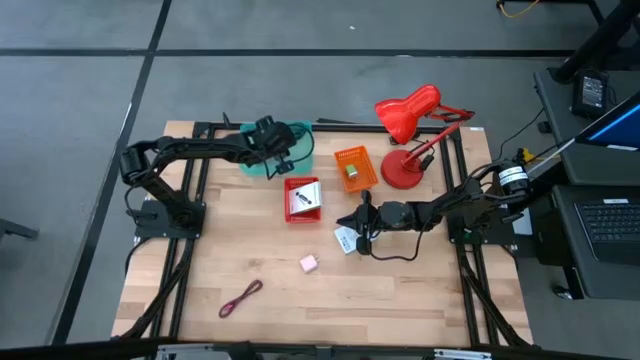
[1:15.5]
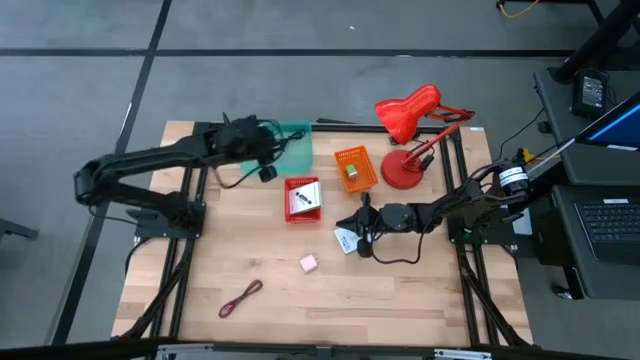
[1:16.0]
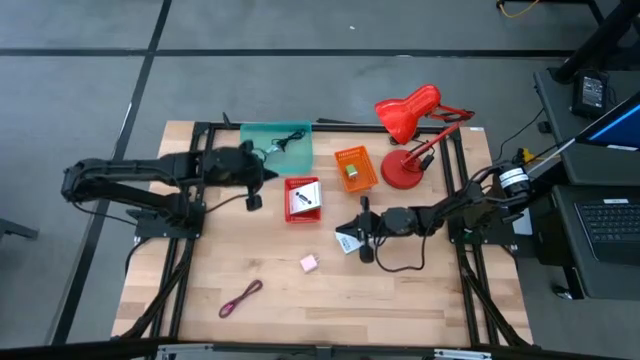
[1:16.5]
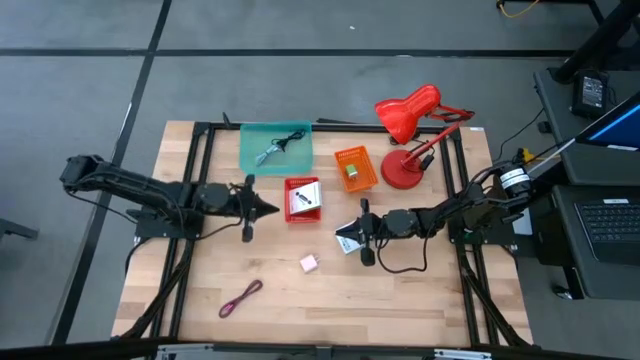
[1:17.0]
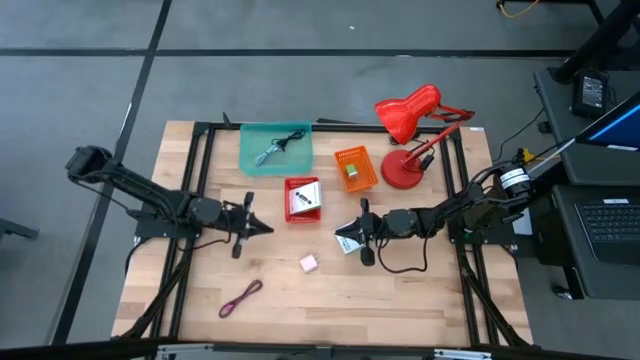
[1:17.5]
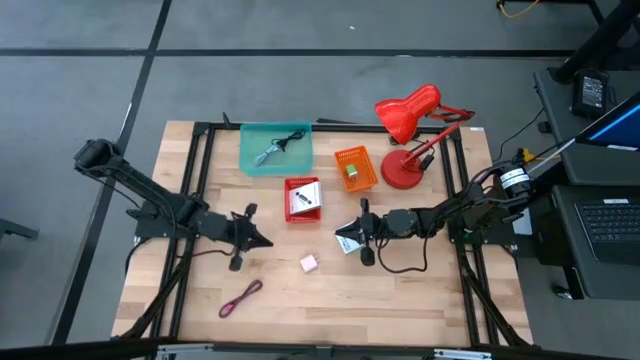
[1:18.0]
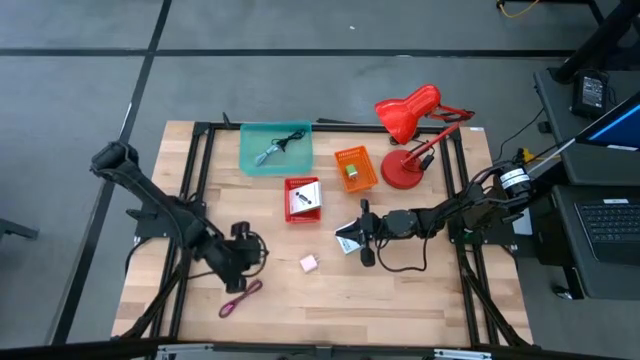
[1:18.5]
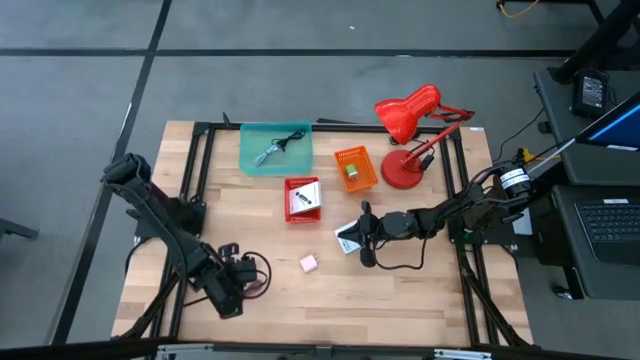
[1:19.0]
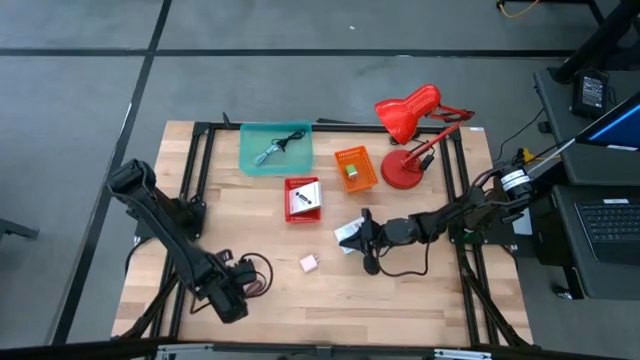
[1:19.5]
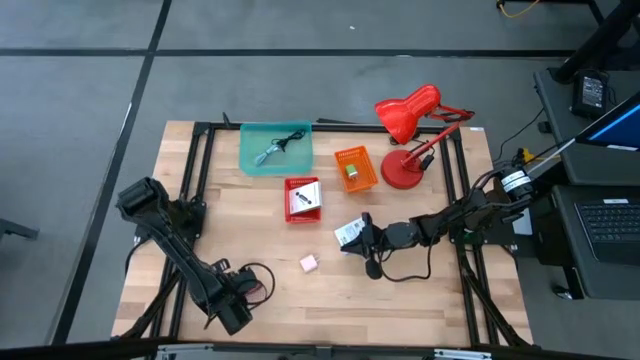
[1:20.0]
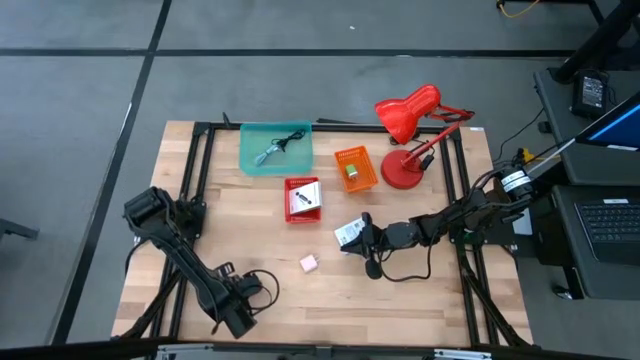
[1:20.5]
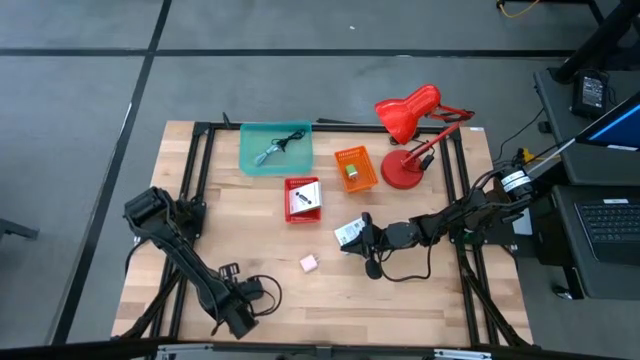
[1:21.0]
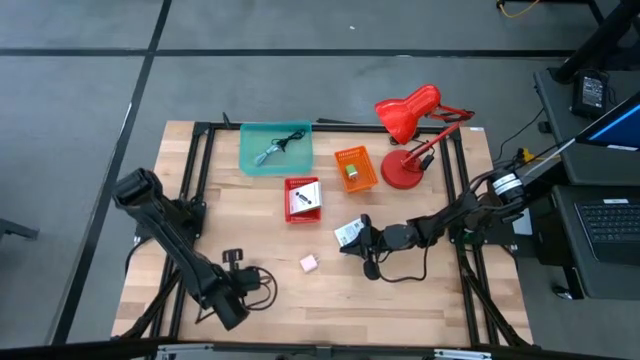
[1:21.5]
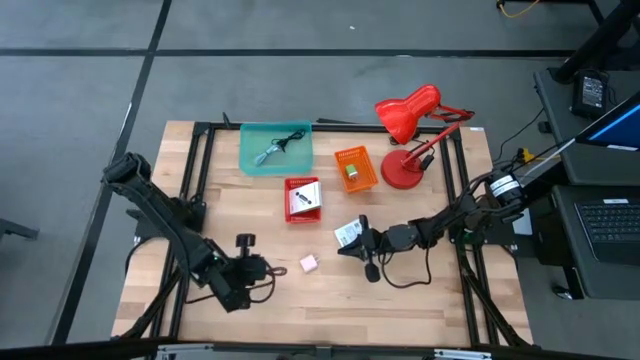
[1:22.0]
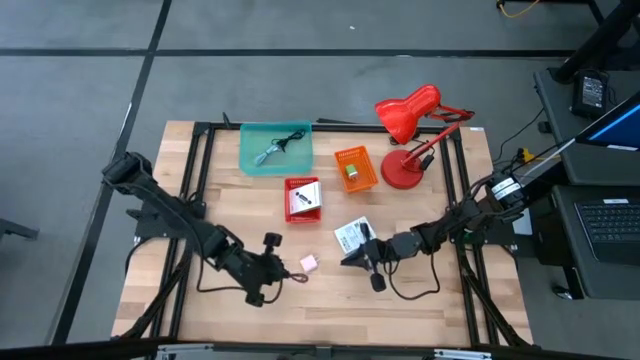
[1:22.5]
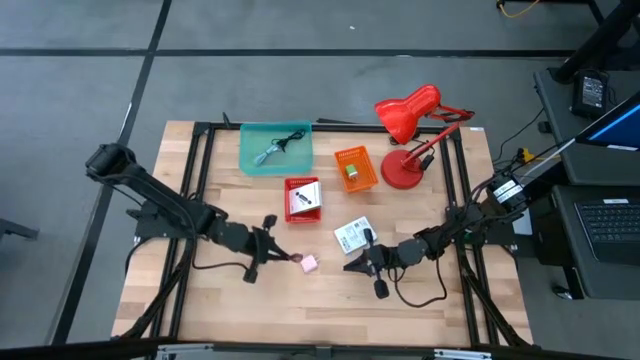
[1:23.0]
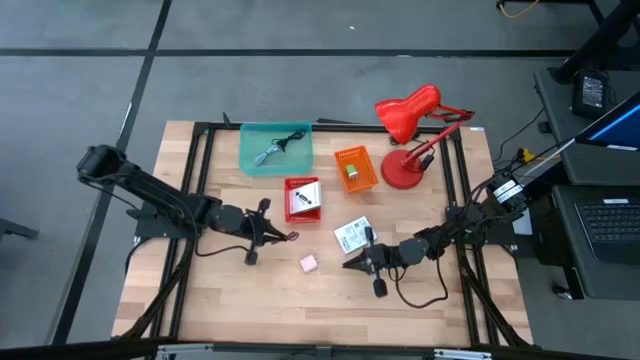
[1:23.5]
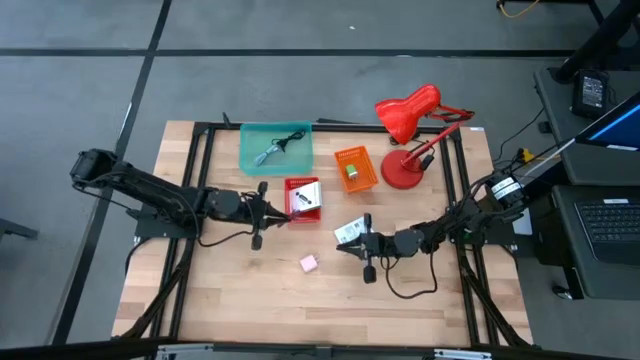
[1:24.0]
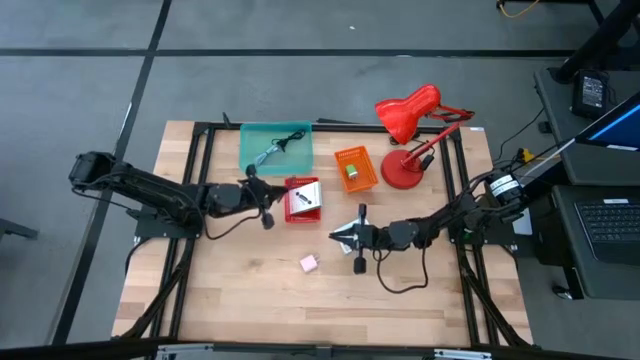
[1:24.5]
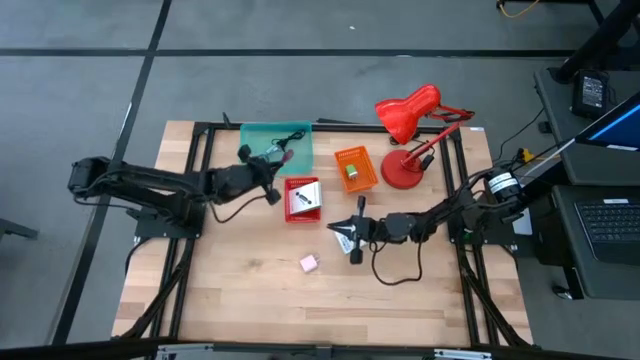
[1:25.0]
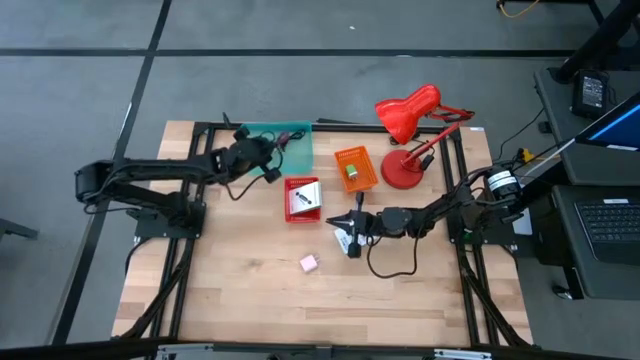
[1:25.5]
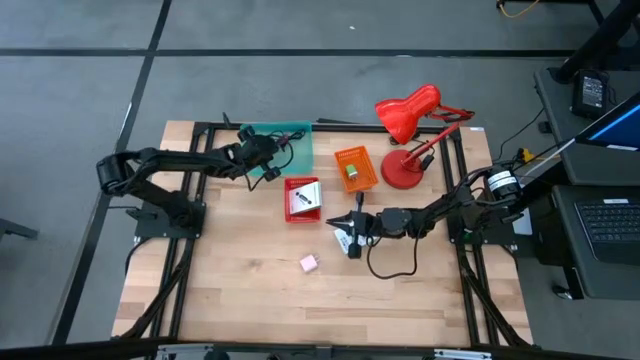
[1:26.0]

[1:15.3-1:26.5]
Task: Pick and place items into bin
Put the pink charger cable into the blue bin

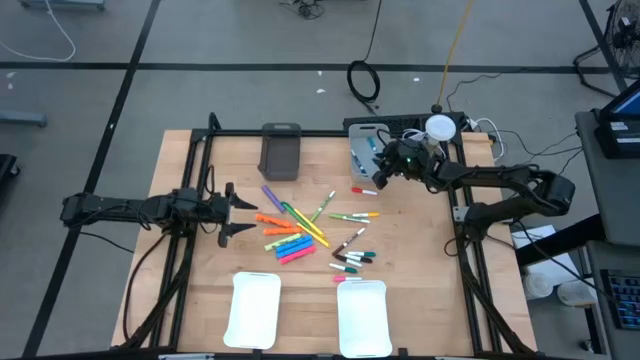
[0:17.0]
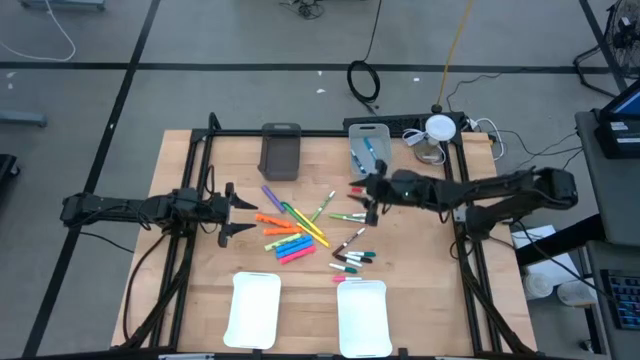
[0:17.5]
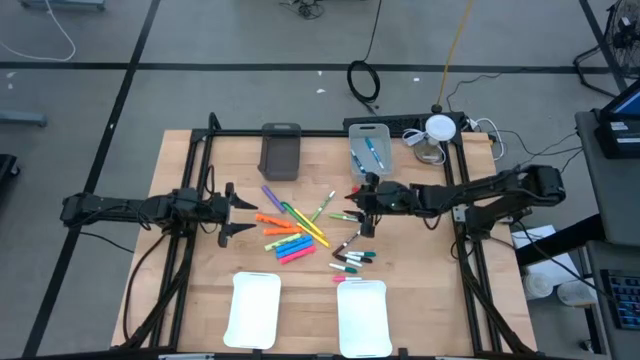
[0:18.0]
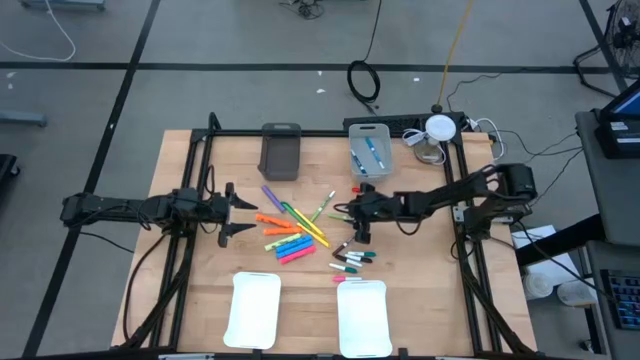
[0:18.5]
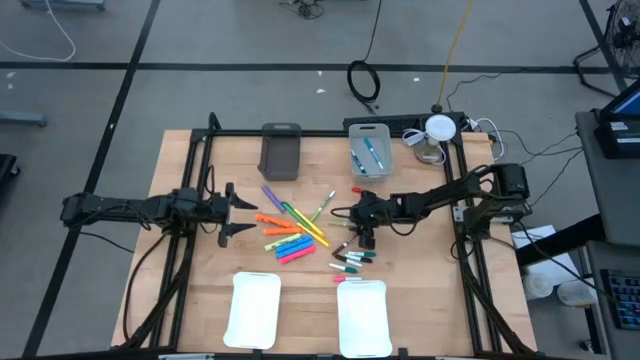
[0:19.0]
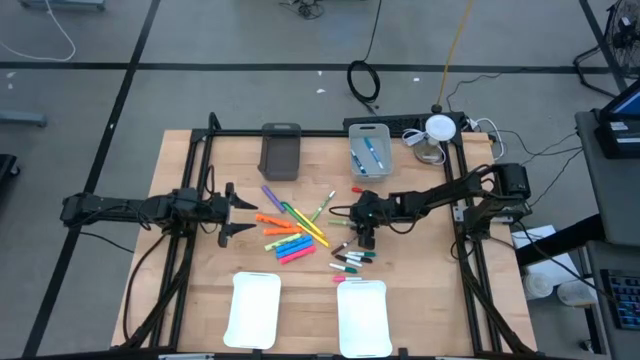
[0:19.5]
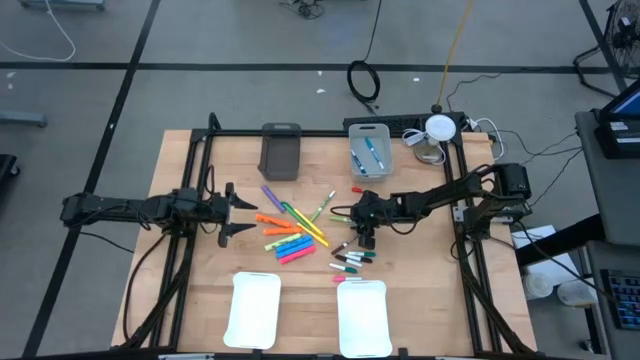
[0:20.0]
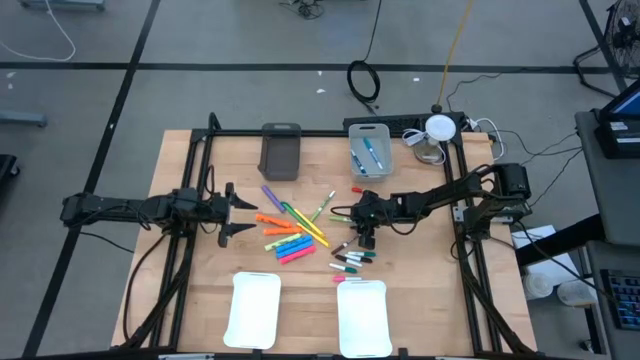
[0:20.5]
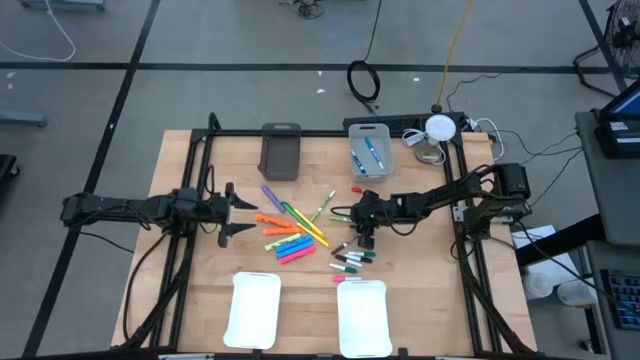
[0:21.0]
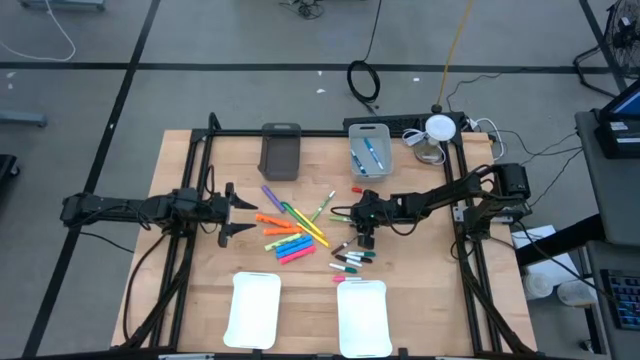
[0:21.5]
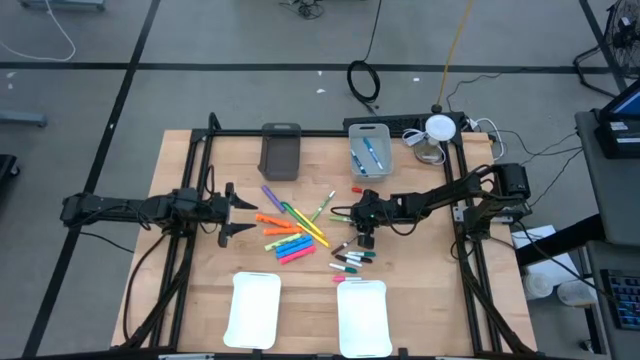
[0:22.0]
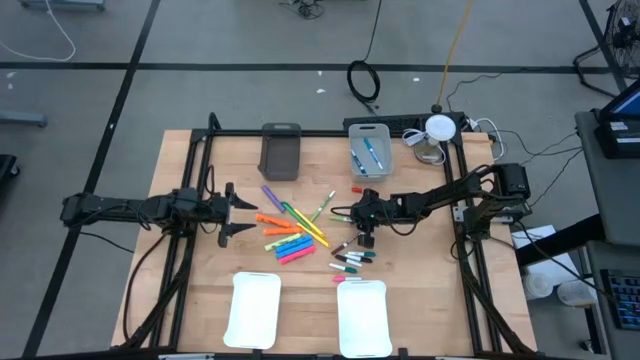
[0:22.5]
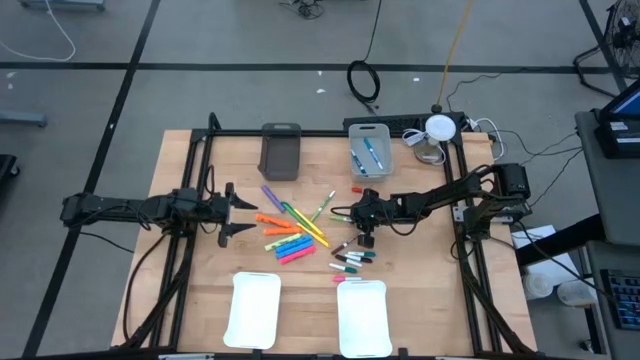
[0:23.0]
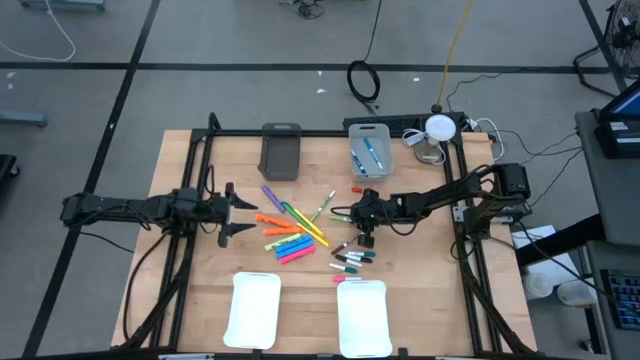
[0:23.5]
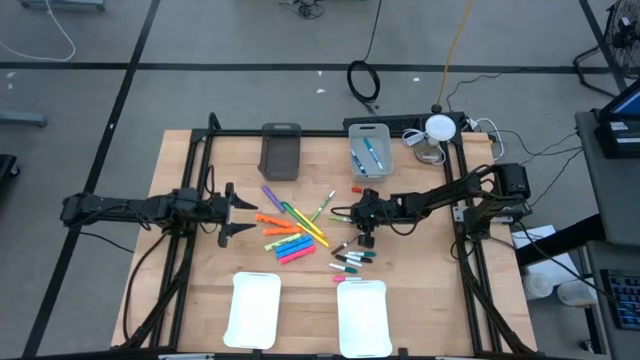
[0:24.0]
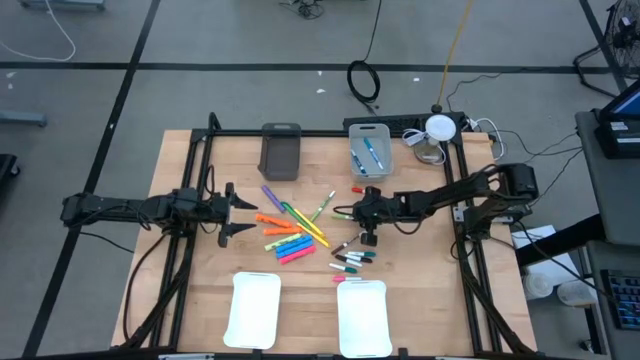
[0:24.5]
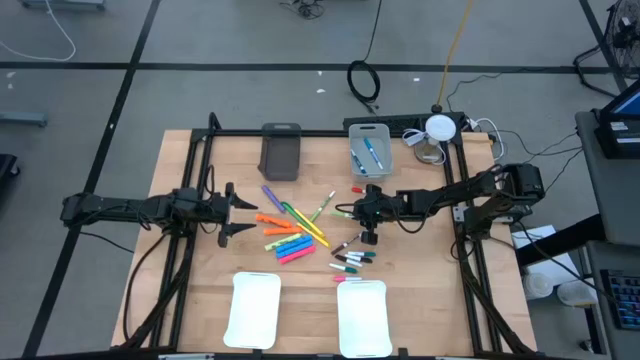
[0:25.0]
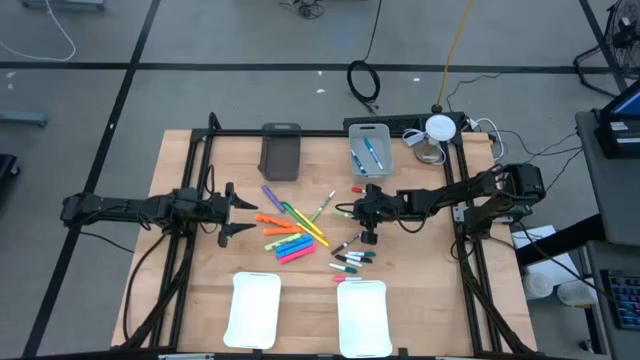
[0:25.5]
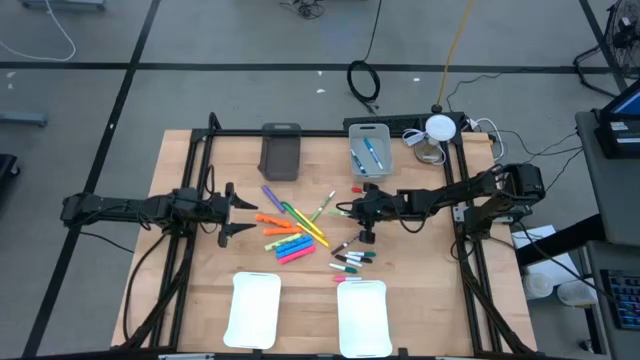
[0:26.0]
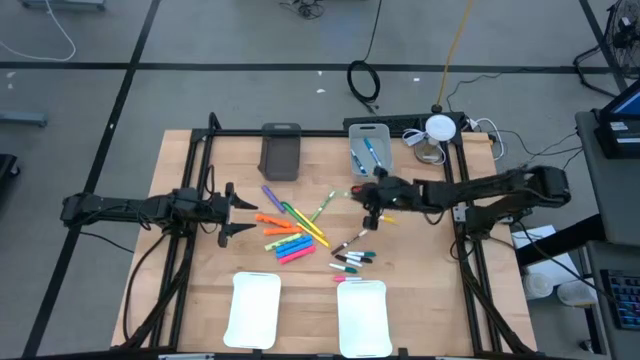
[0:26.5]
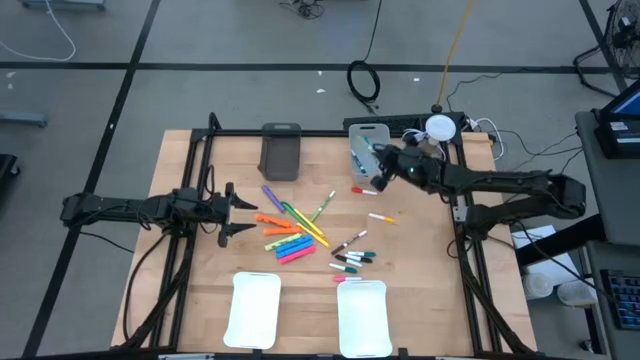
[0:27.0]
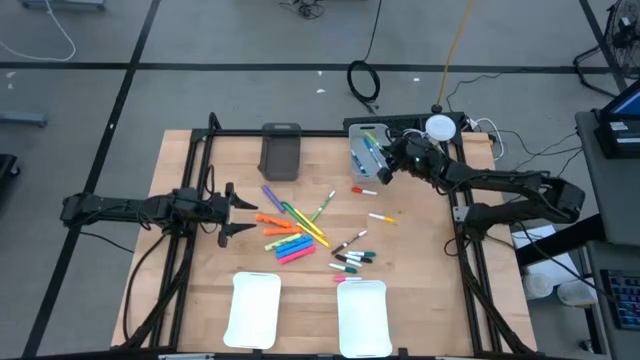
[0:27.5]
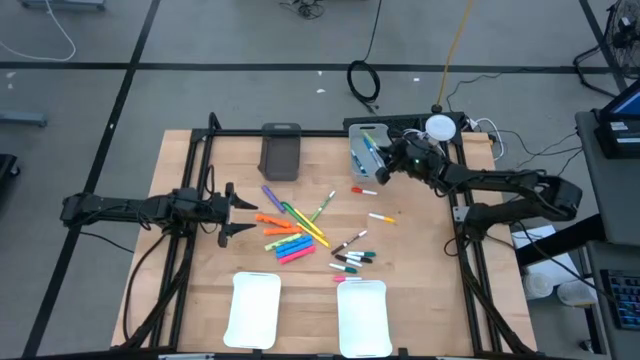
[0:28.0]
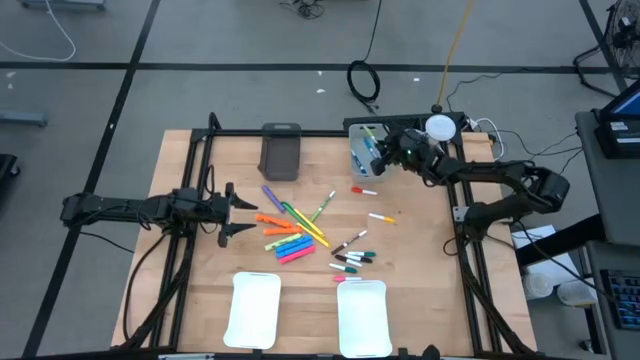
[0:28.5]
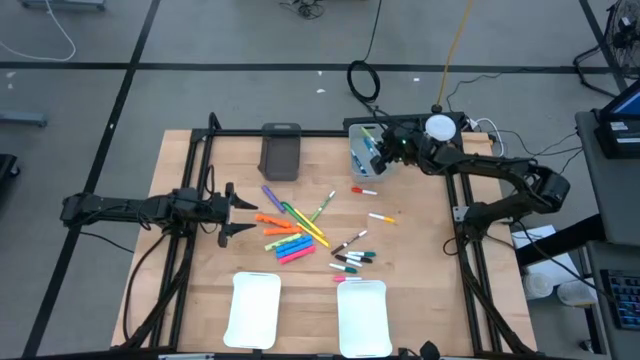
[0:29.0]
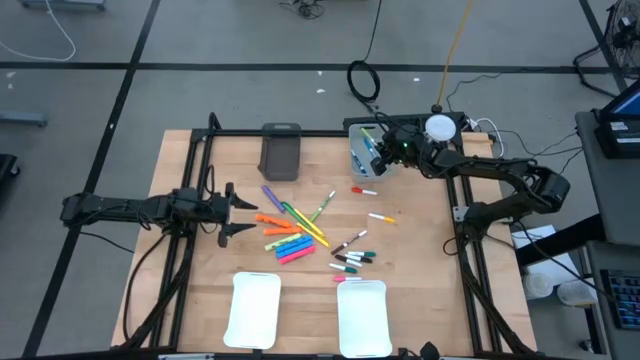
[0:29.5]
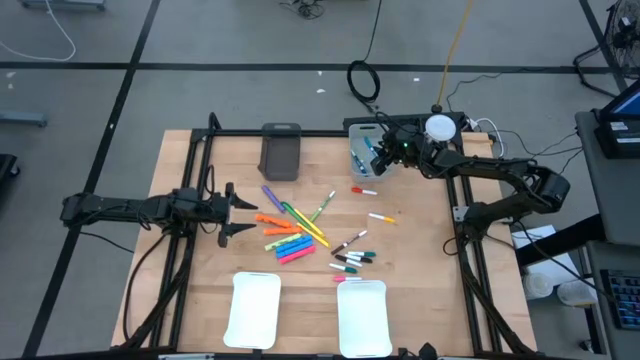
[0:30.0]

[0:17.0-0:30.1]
Task: Pick & Place Markers
Put the right green marker pen into the gray bin
